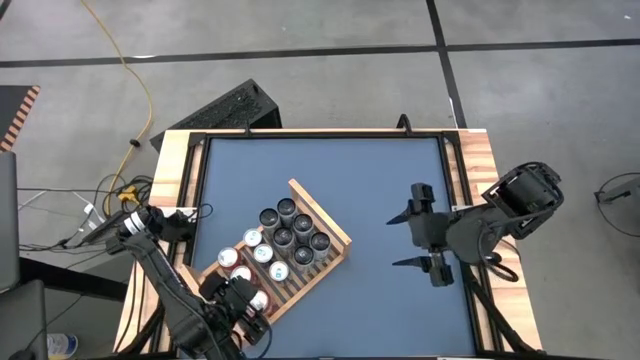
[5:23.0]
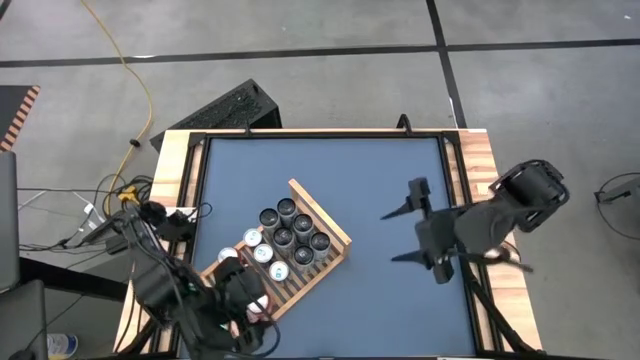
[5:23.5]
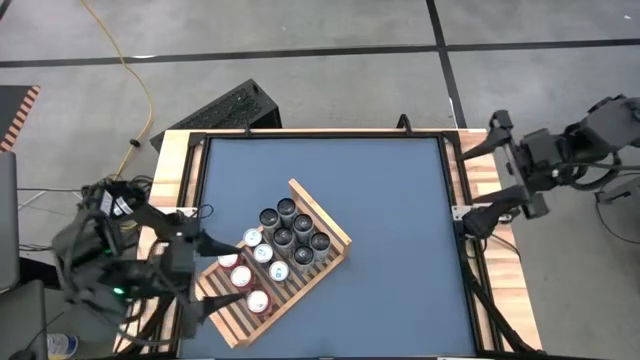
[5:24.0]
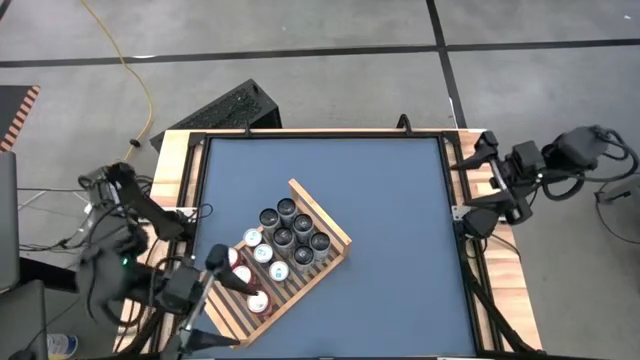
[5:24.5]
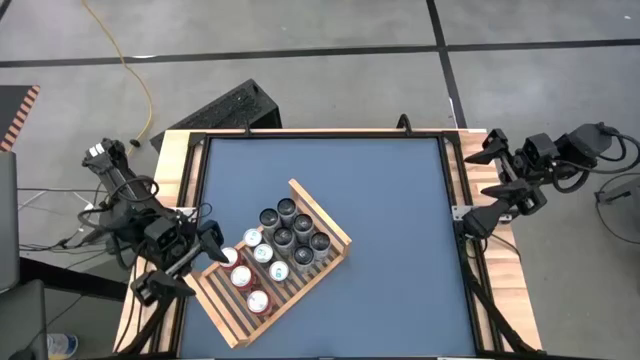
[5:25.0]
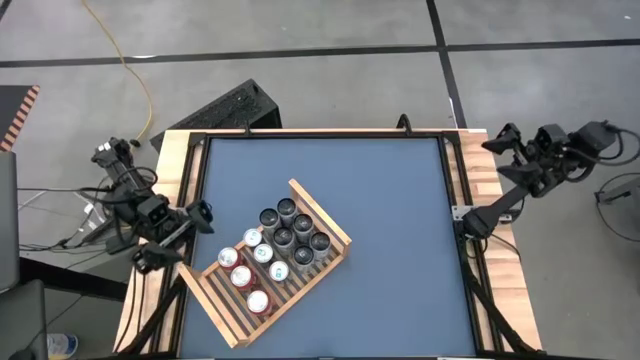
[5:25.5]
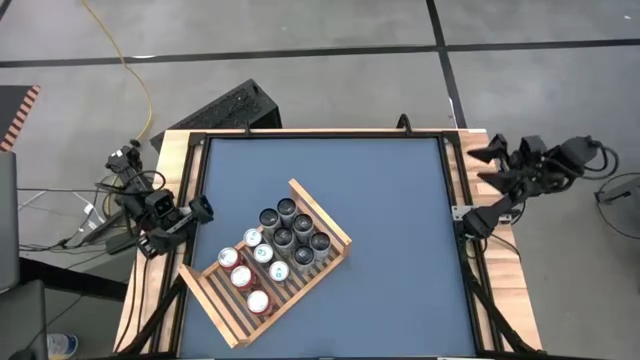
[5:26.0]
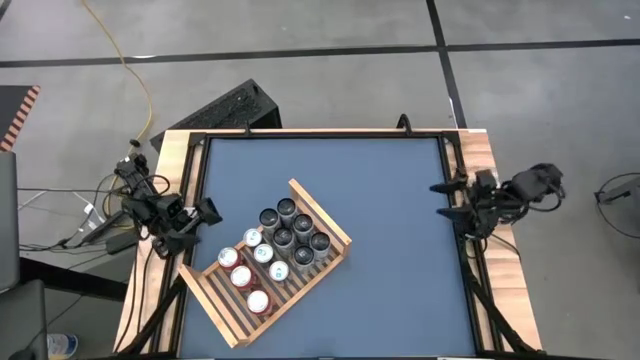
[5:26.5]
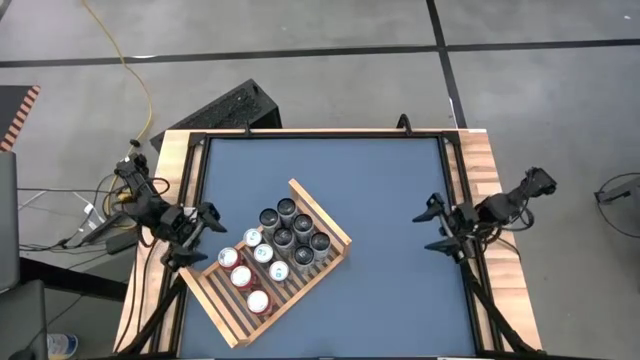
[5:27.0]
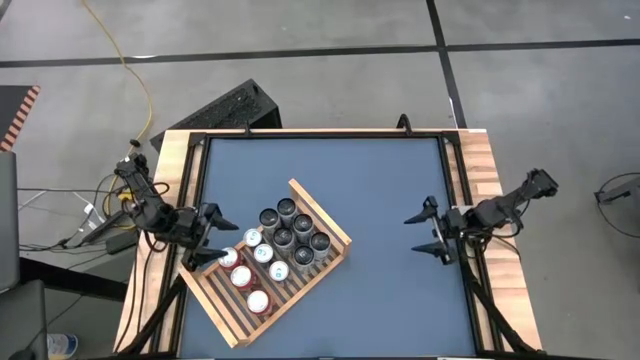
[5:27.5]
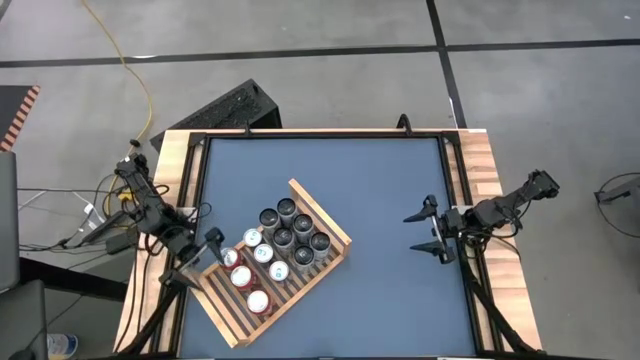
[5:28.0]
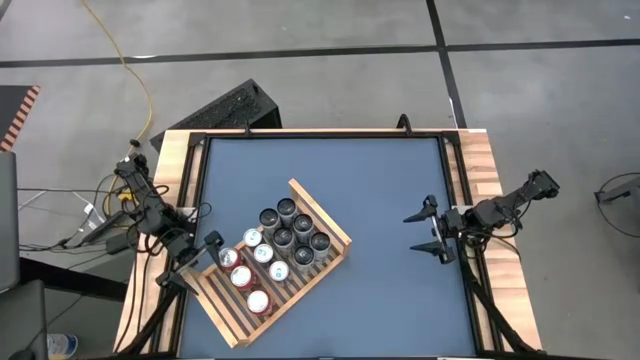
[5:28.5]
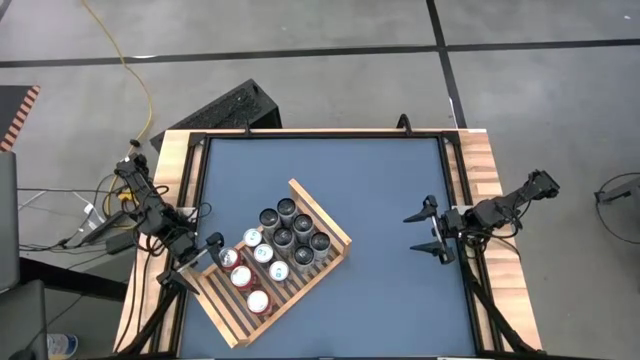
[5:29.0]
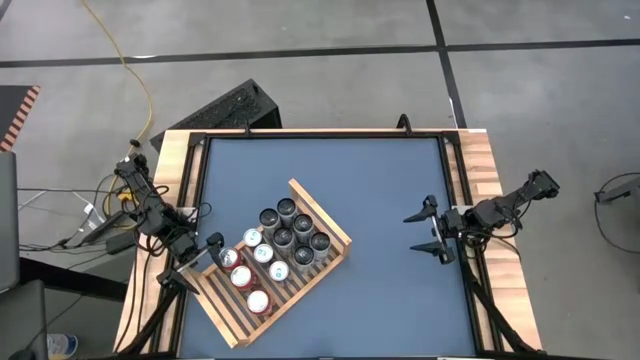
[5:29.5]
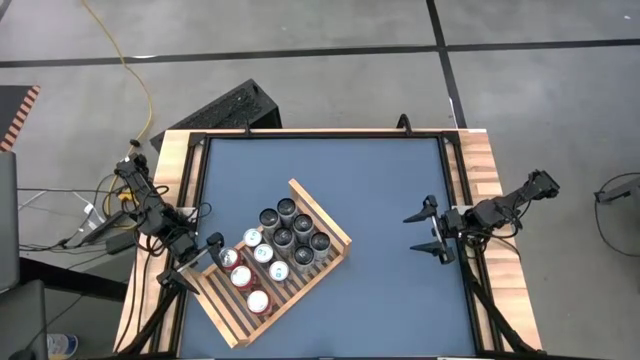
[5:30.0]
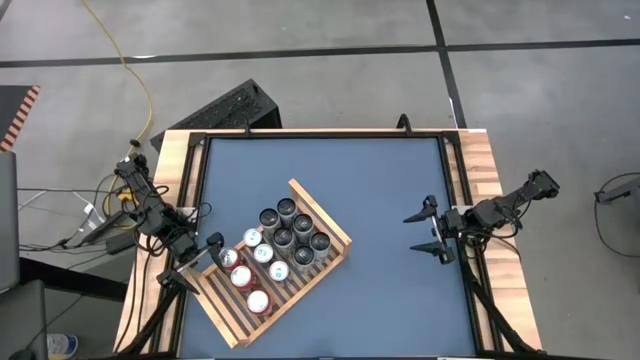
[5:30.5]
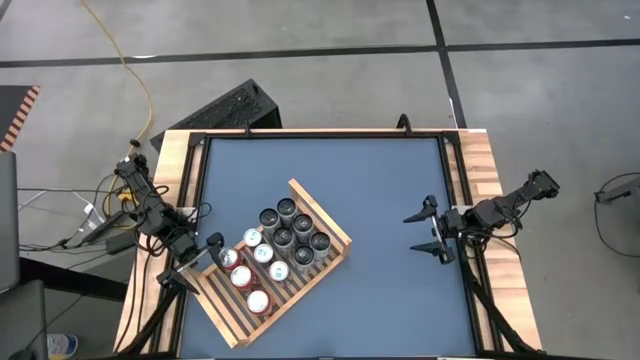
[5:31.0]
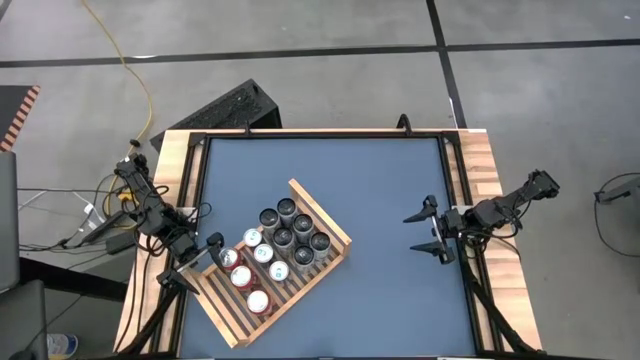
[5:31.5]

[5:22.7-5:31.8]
Task: Place canned beverage on shelf
Return to Home Position

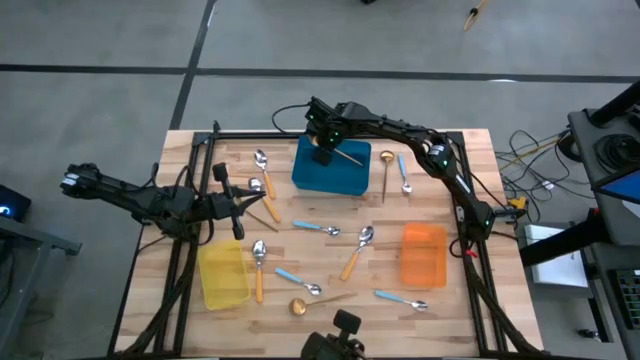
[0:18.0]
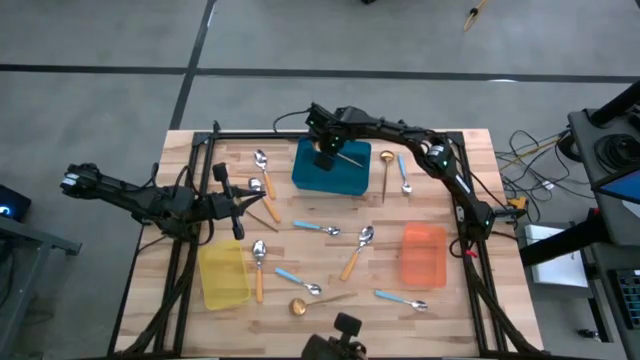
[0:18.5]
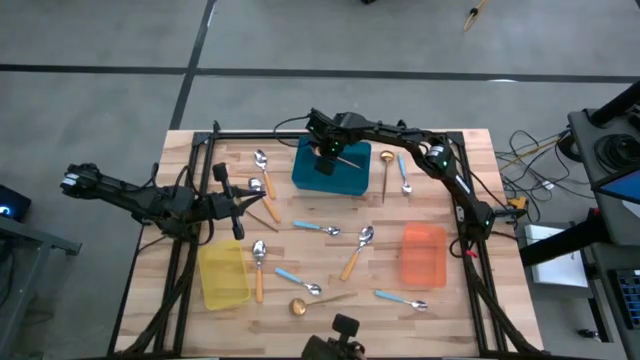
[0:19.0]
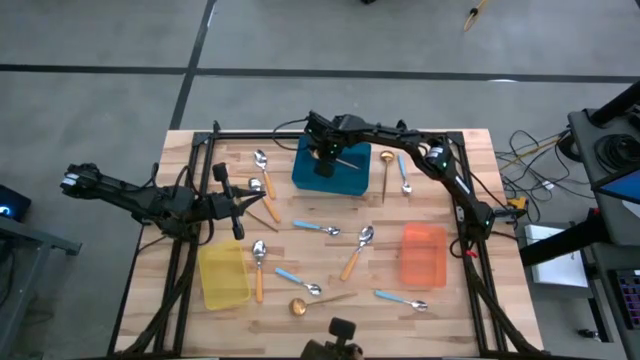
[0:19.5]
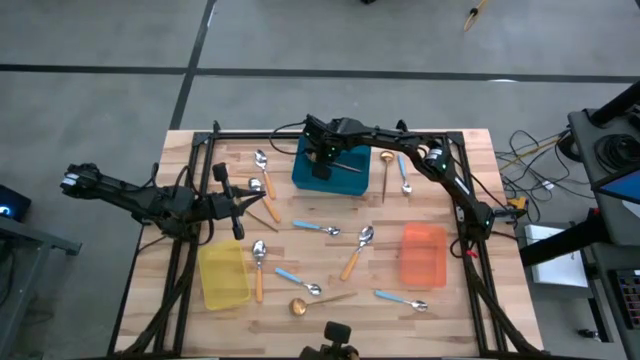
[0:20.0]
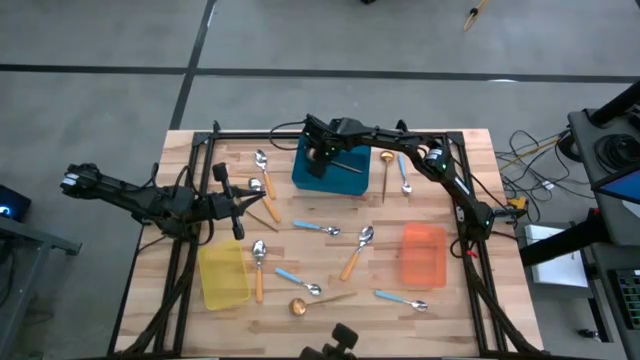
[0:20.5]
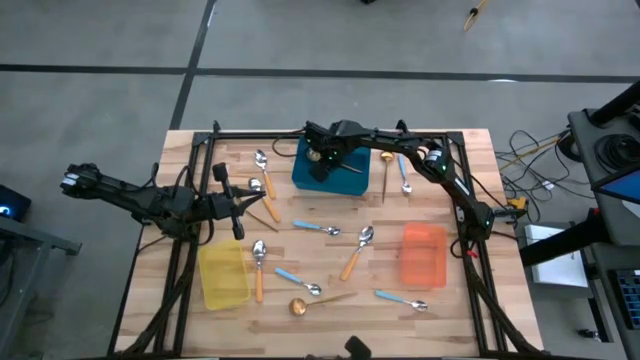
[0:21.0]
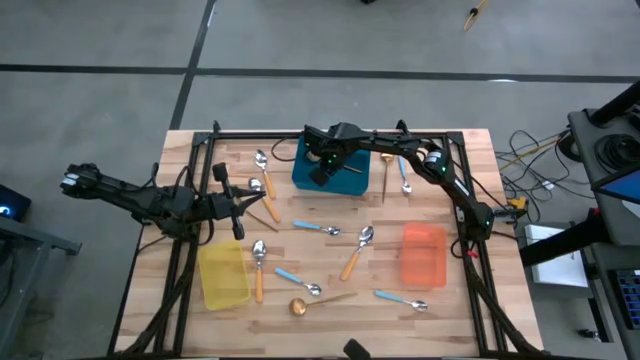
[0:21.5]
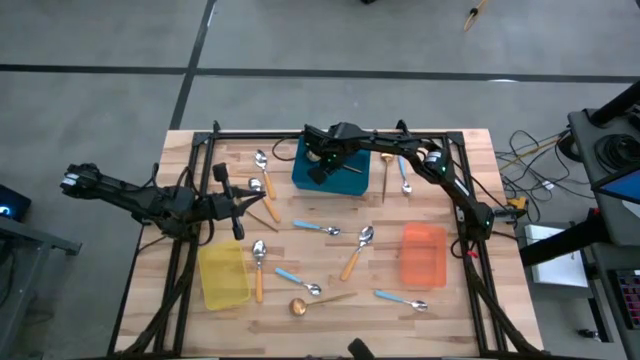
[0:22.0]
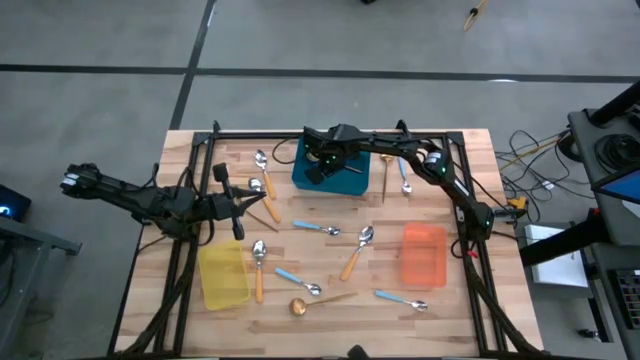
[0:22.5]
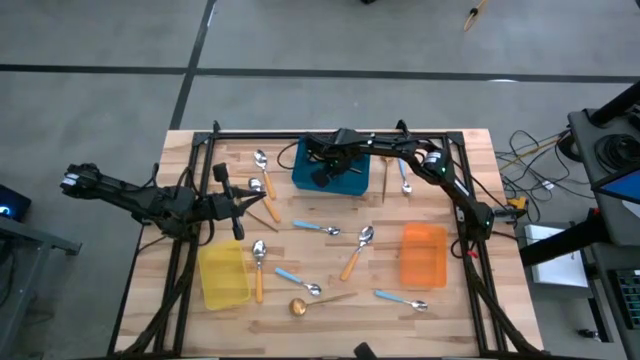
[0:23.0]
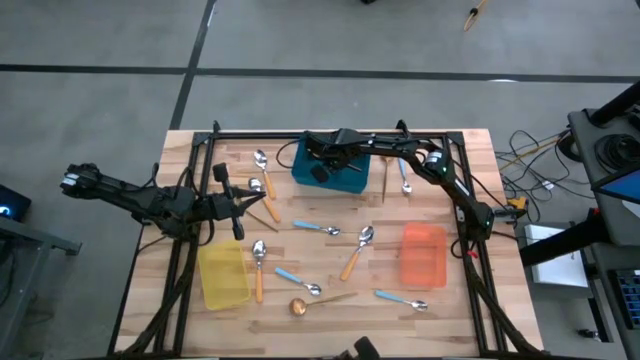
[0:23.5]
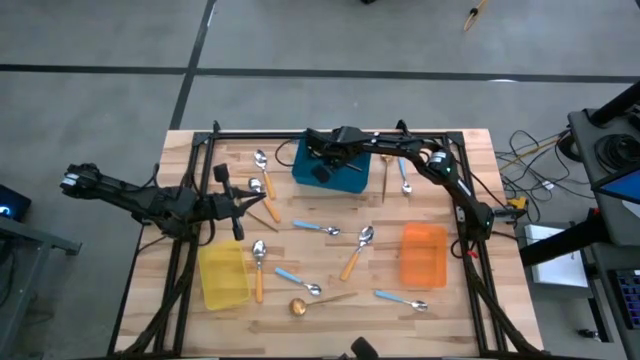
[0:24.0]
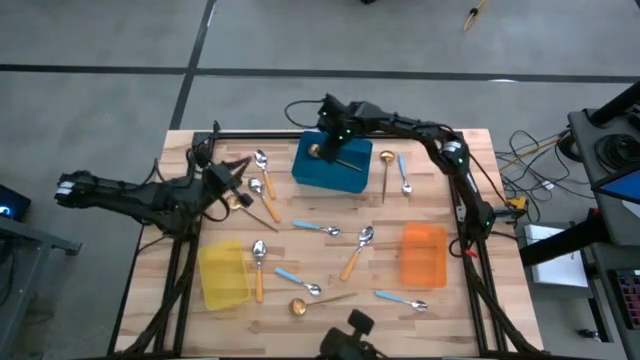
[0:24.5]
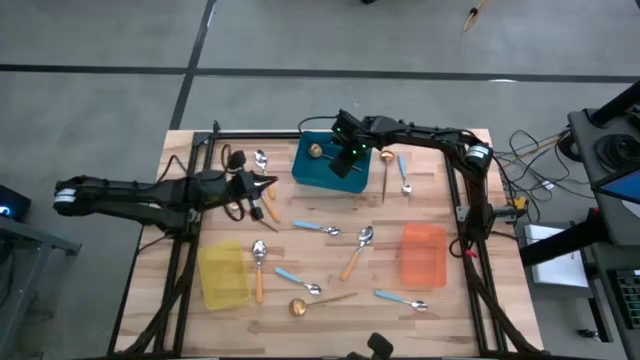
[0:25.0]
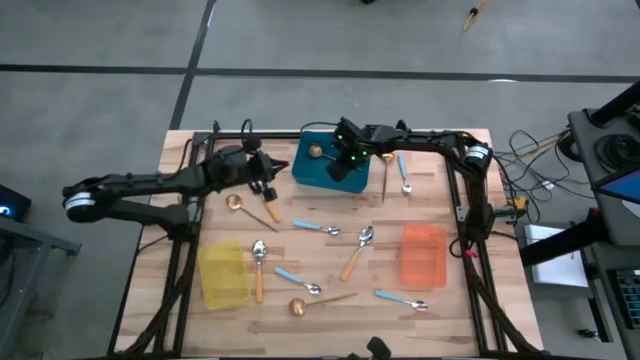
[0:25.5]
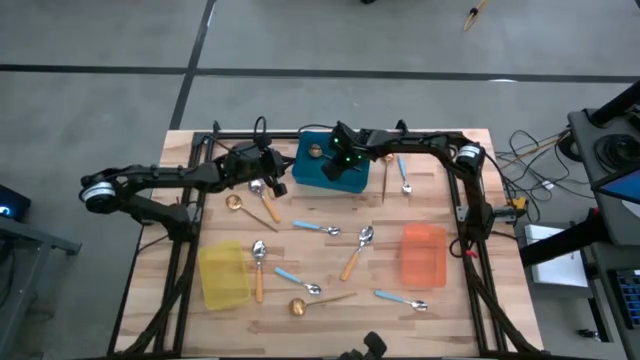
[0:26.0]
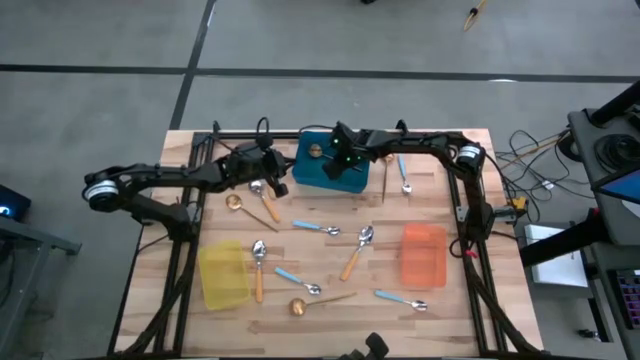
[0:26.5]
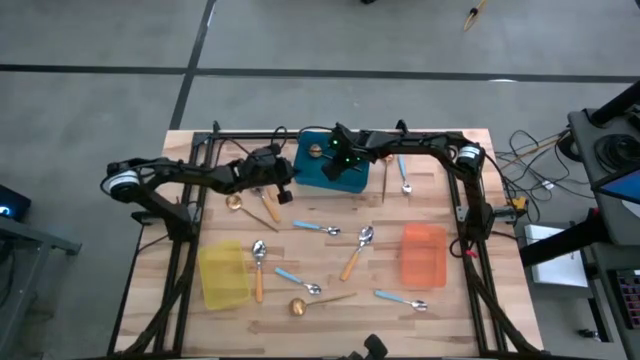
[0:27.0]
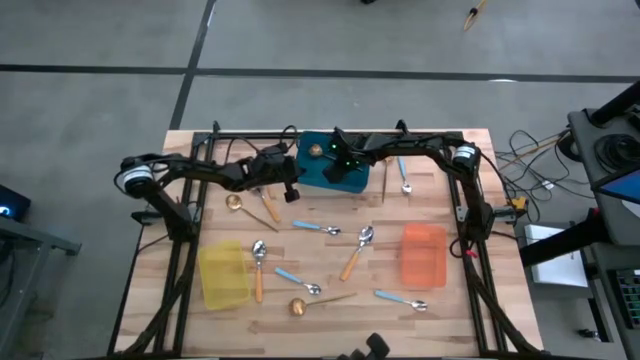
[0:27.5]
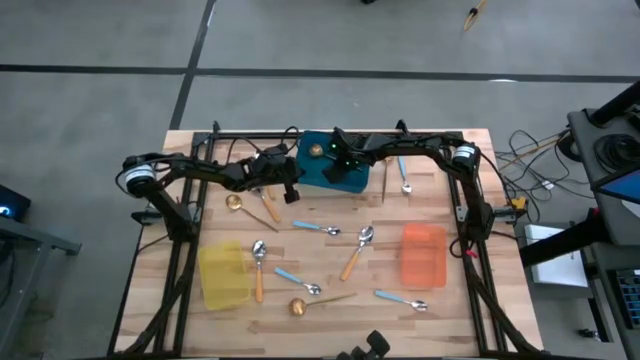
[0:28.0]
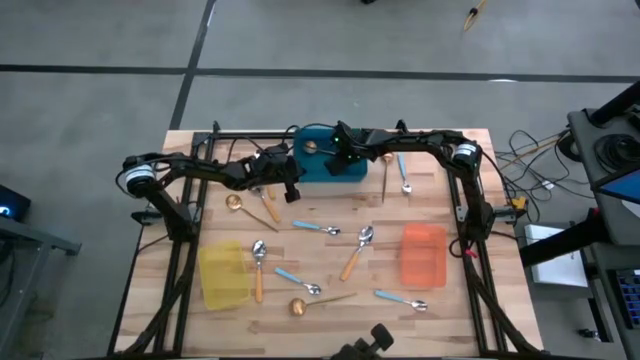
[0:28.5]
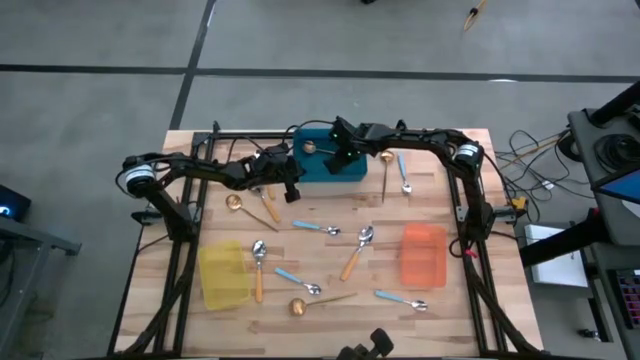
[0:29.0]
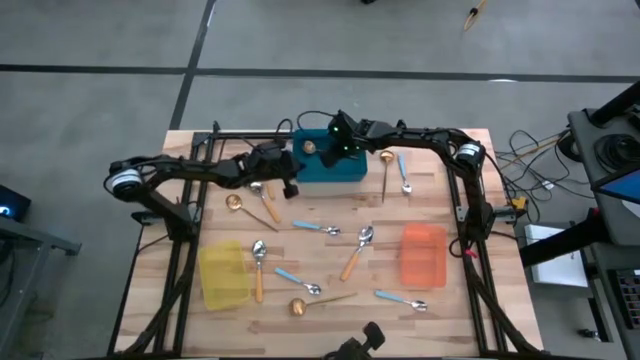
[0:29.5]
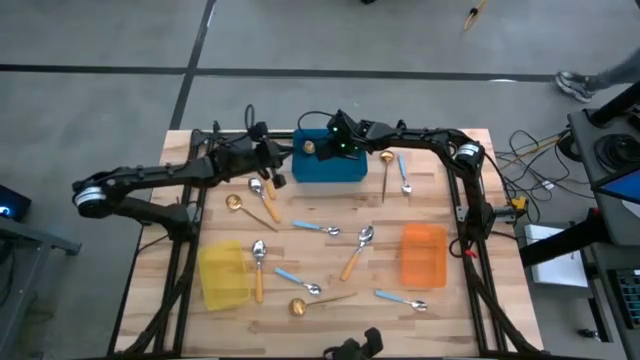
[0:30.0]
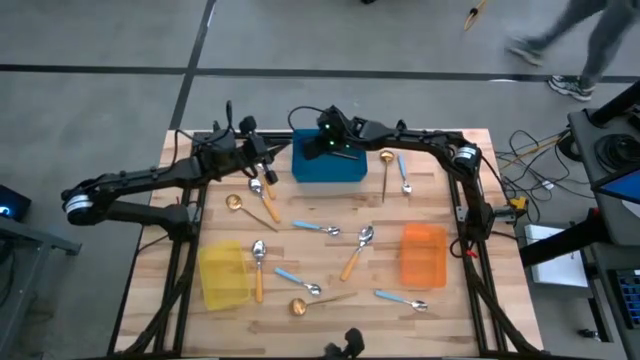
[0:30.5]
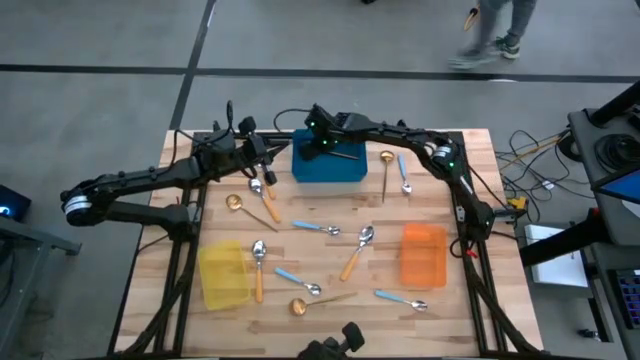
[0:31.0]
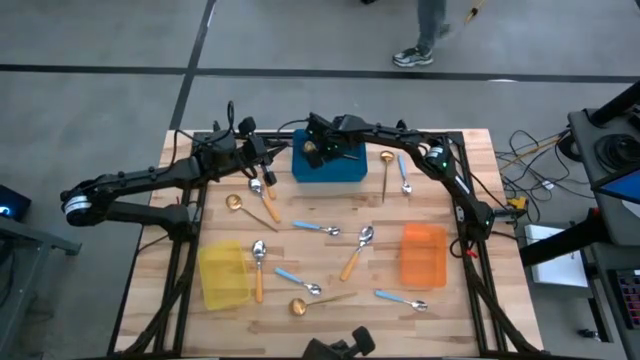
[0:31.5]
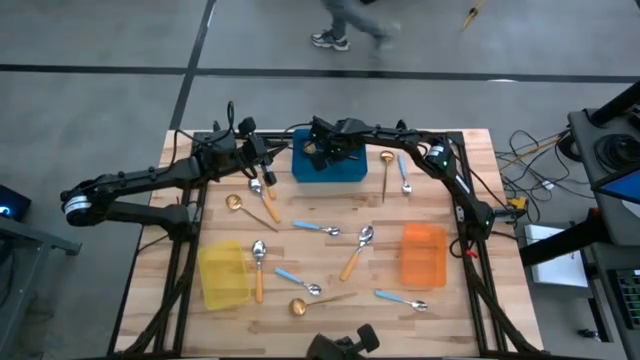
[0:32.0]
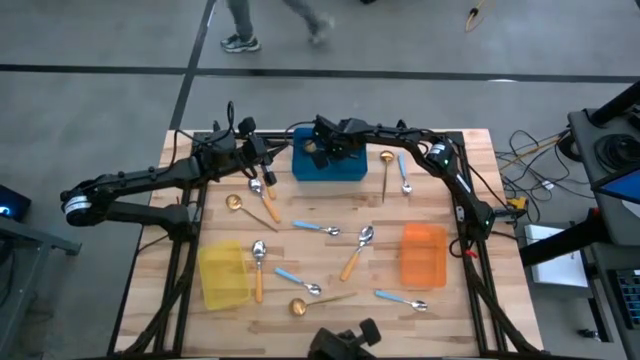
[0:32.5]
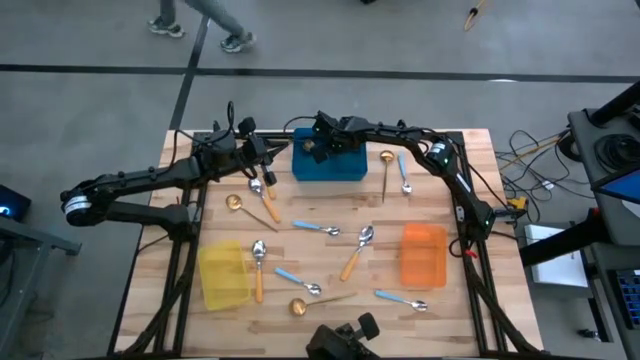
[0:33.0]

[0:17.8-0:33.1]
Task: Sort silverware by color (type)
Put the gold spoon into the blue bin
